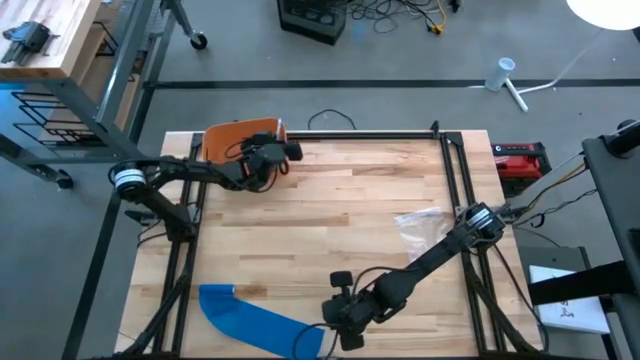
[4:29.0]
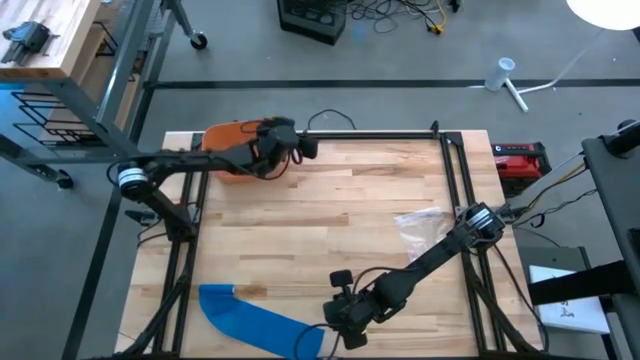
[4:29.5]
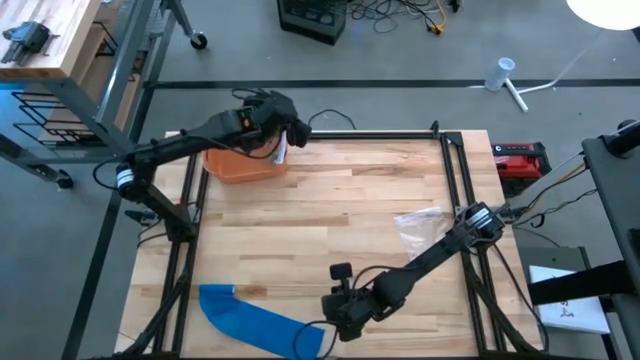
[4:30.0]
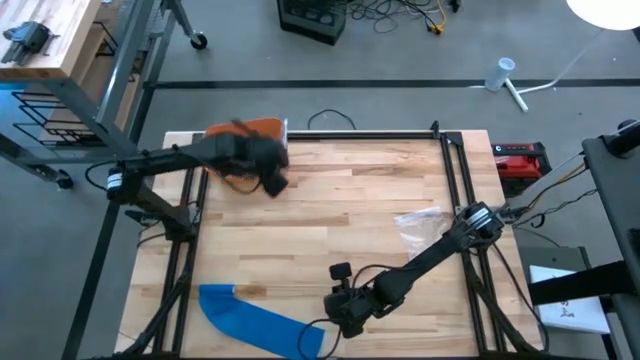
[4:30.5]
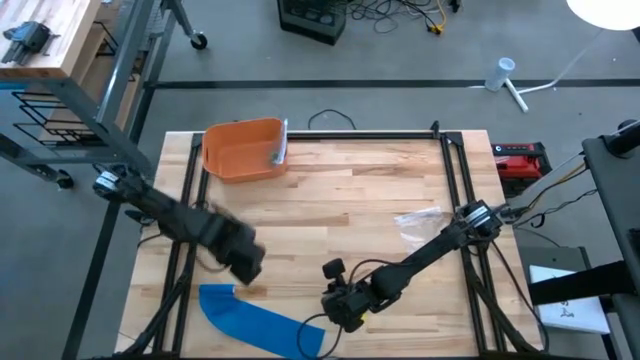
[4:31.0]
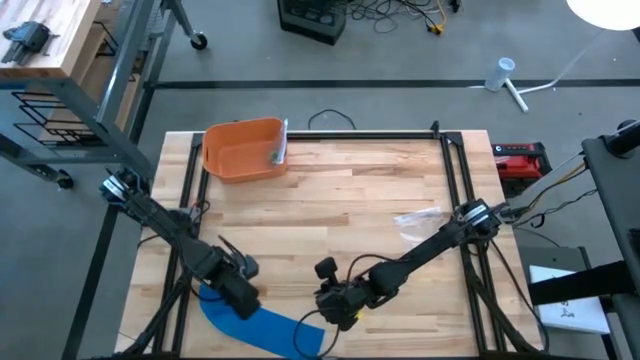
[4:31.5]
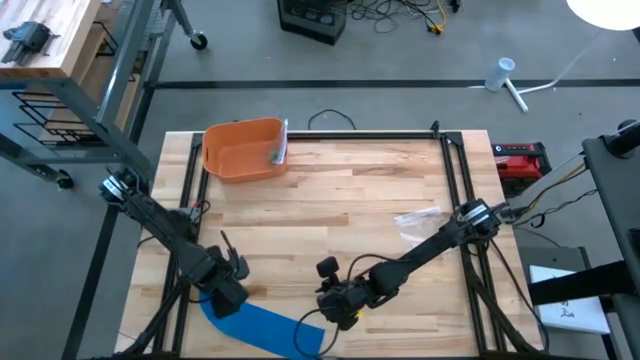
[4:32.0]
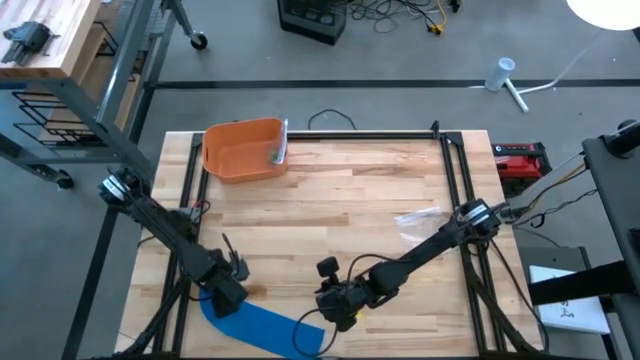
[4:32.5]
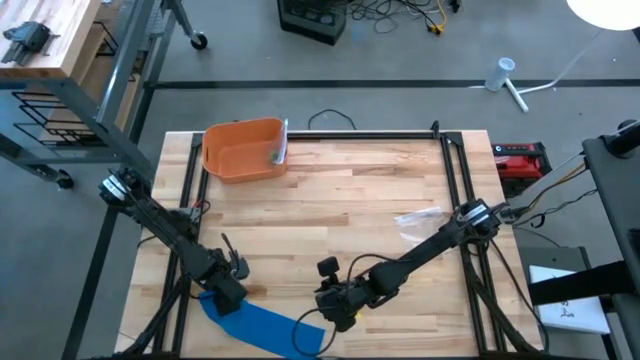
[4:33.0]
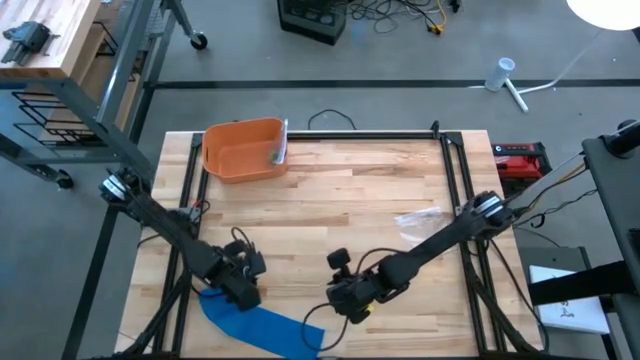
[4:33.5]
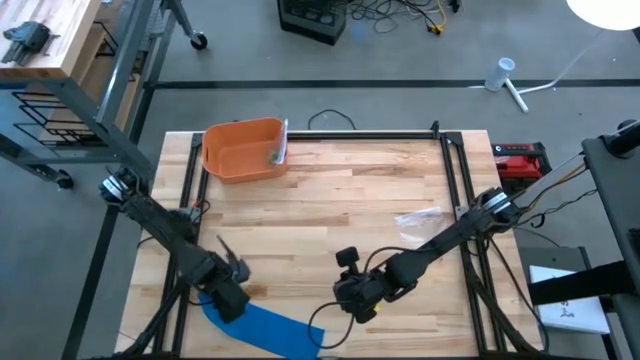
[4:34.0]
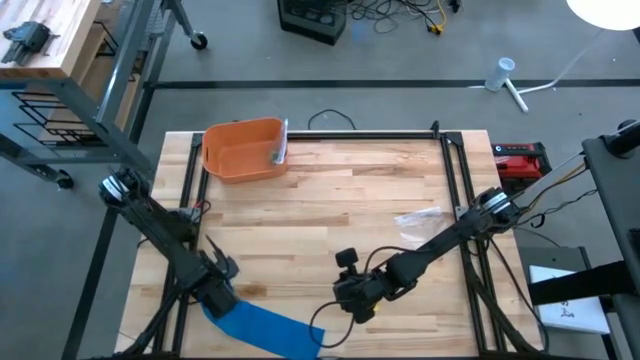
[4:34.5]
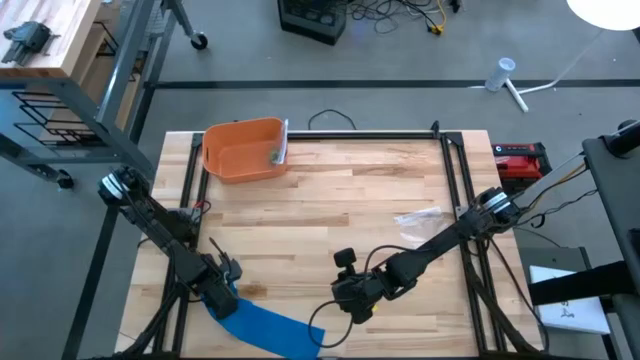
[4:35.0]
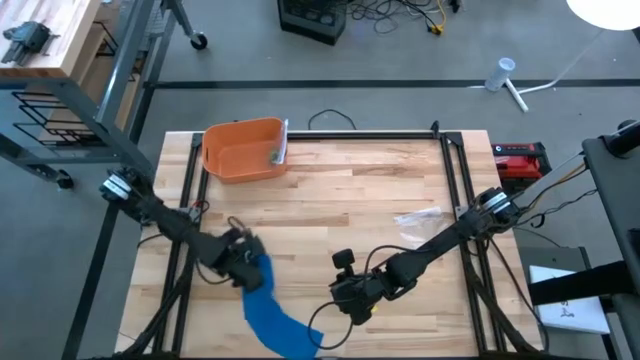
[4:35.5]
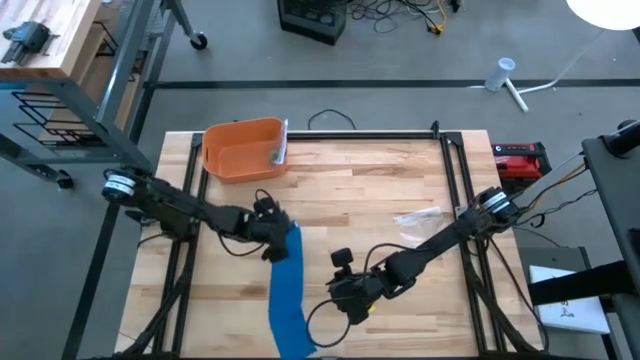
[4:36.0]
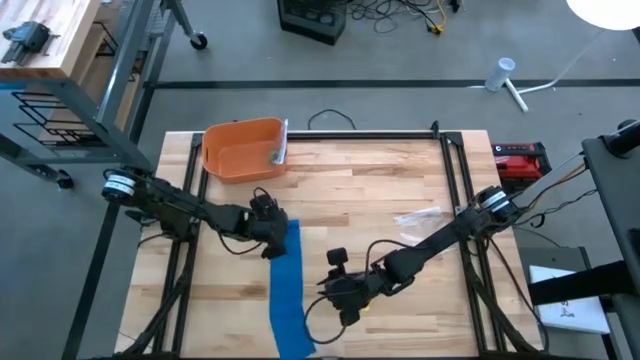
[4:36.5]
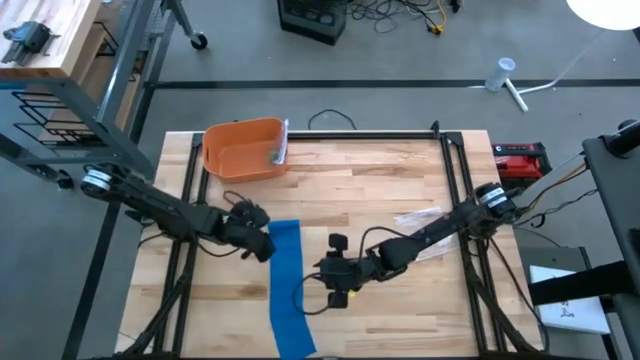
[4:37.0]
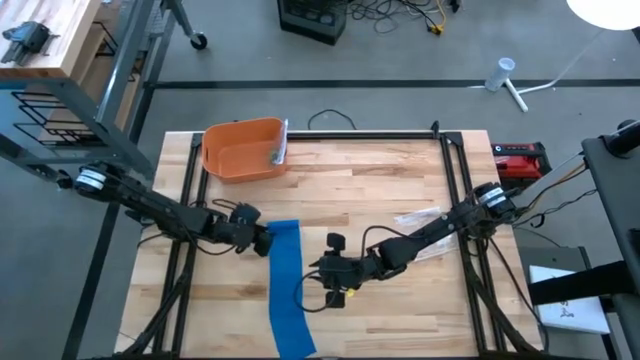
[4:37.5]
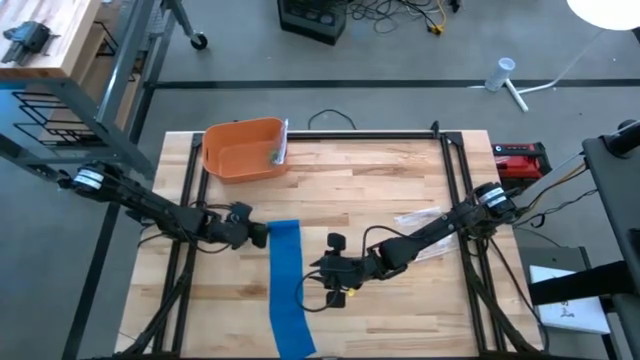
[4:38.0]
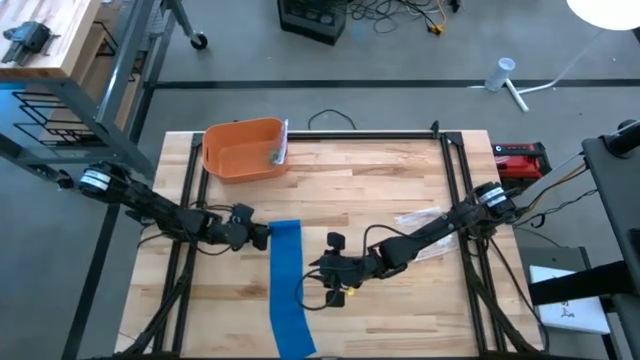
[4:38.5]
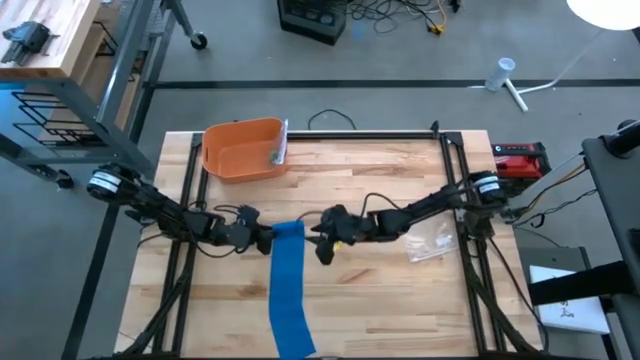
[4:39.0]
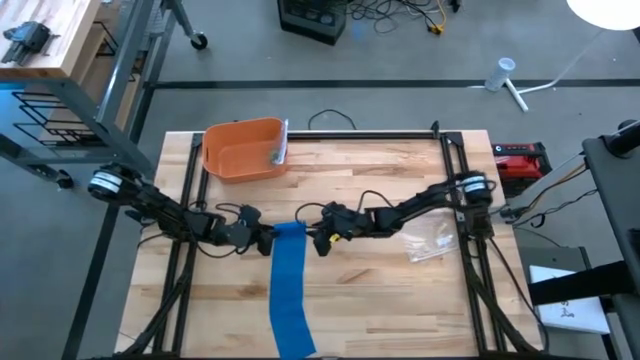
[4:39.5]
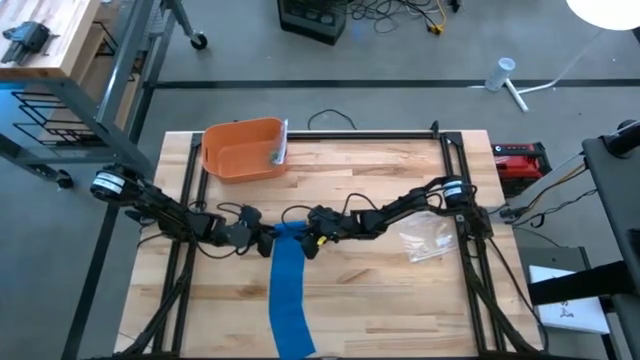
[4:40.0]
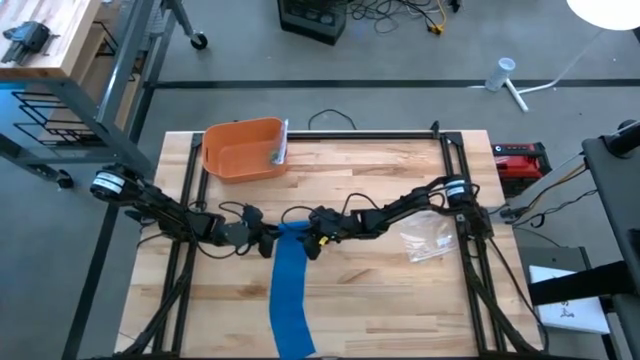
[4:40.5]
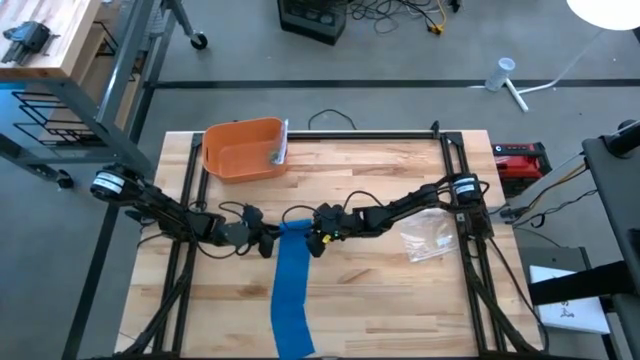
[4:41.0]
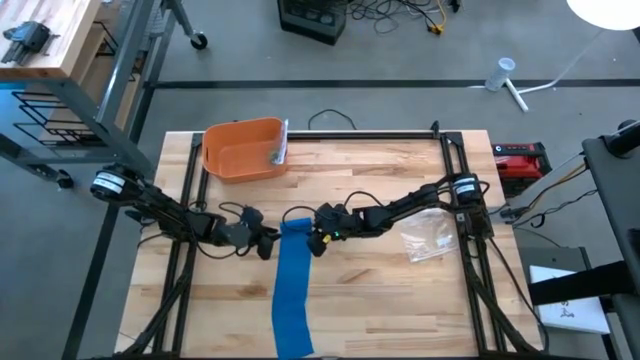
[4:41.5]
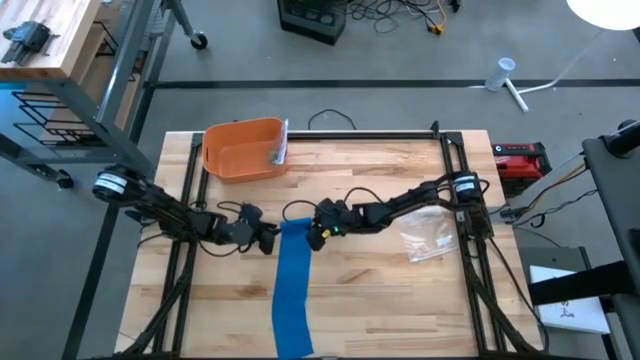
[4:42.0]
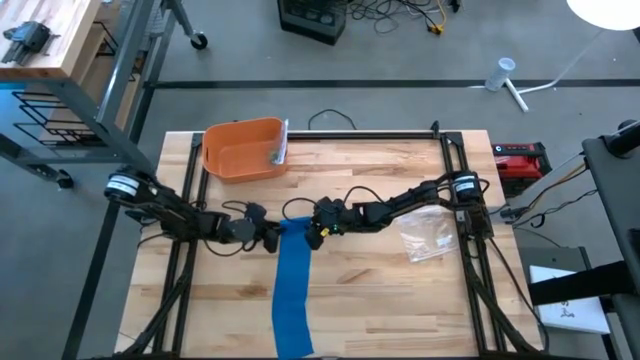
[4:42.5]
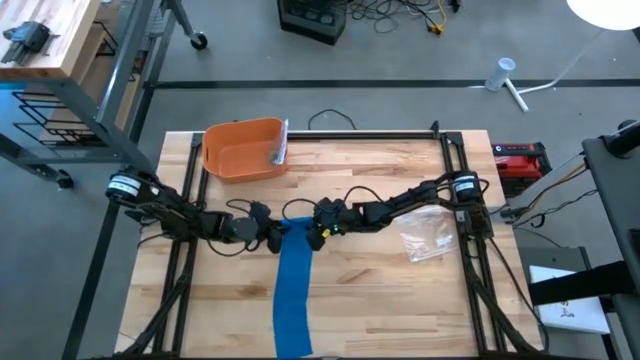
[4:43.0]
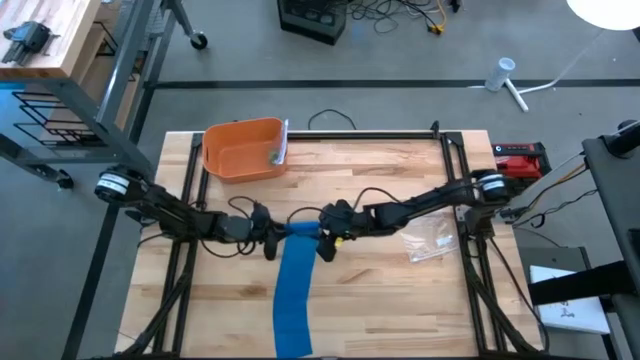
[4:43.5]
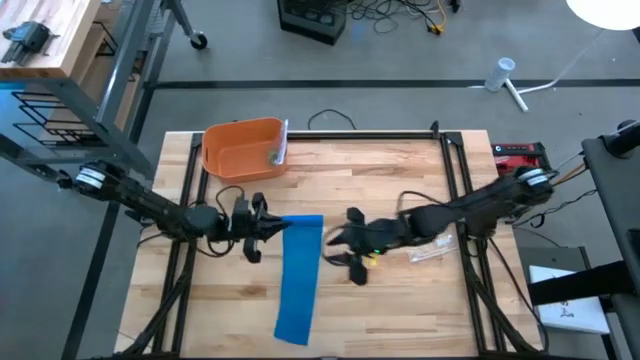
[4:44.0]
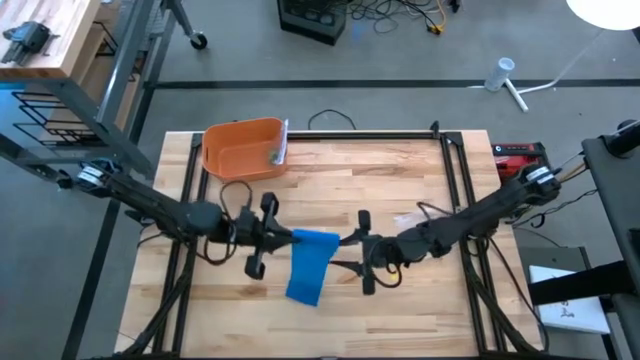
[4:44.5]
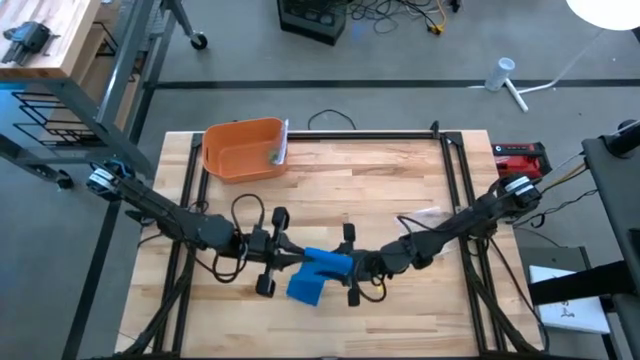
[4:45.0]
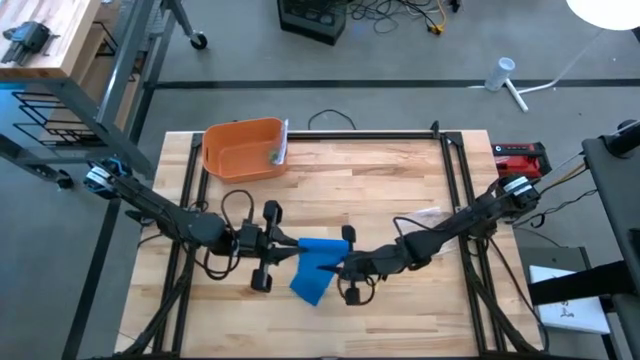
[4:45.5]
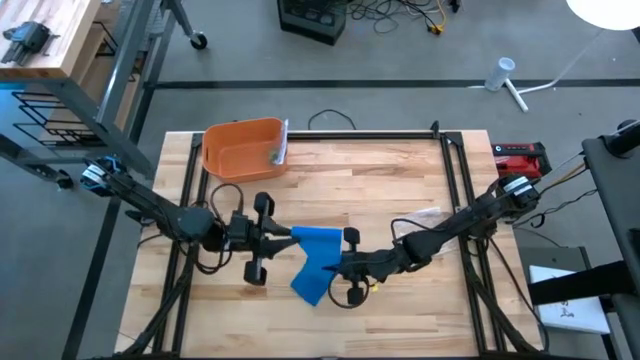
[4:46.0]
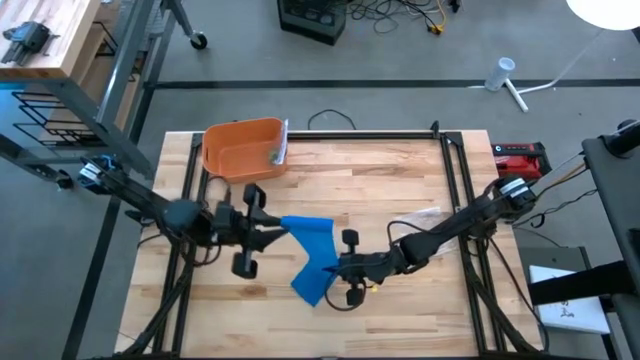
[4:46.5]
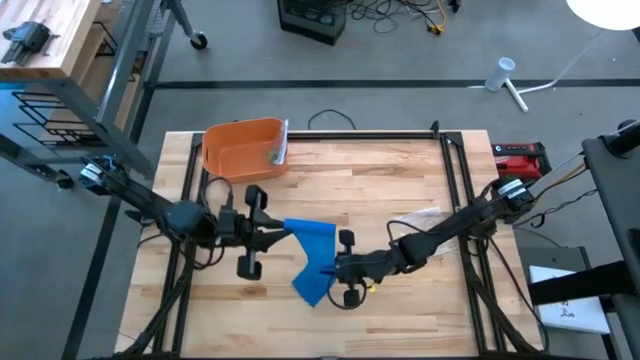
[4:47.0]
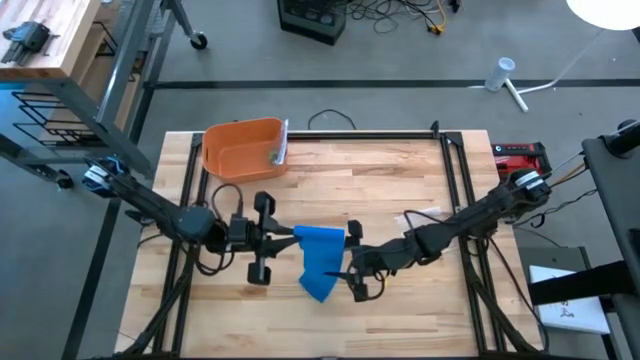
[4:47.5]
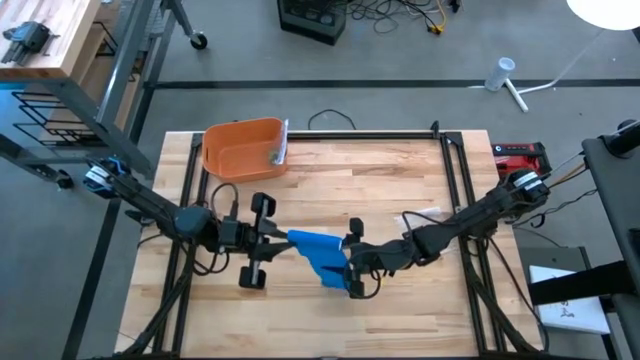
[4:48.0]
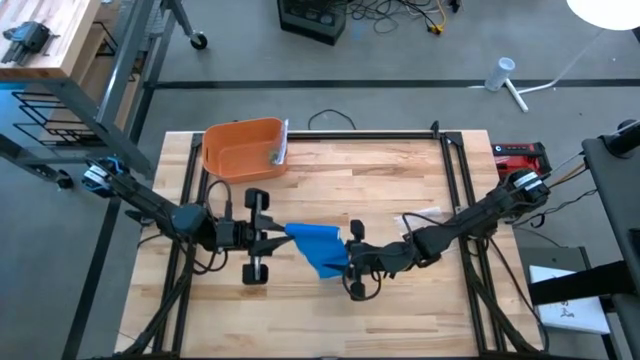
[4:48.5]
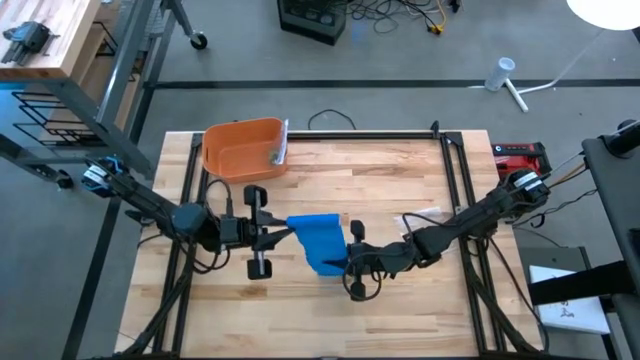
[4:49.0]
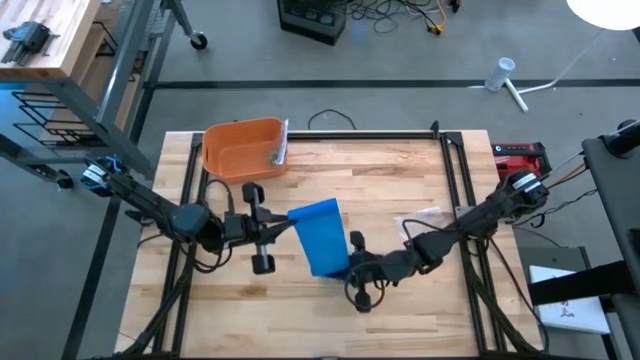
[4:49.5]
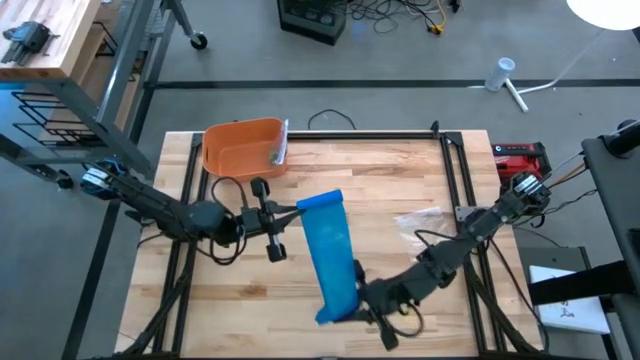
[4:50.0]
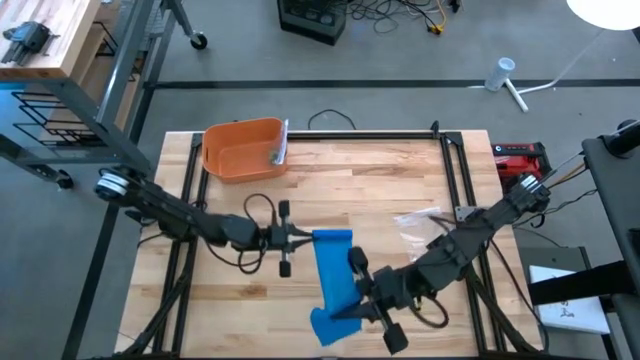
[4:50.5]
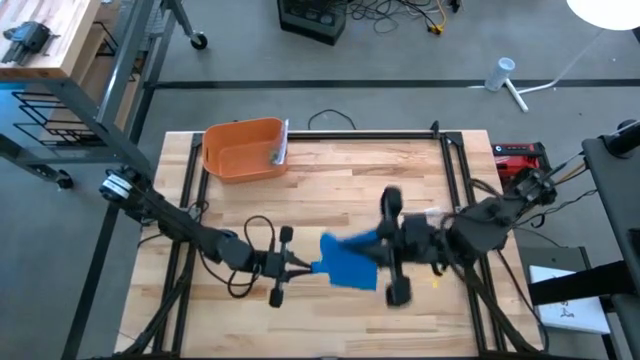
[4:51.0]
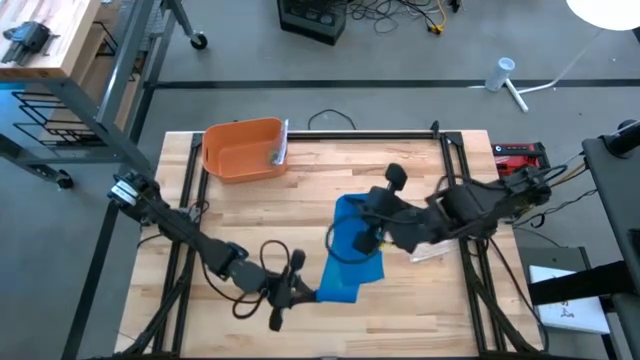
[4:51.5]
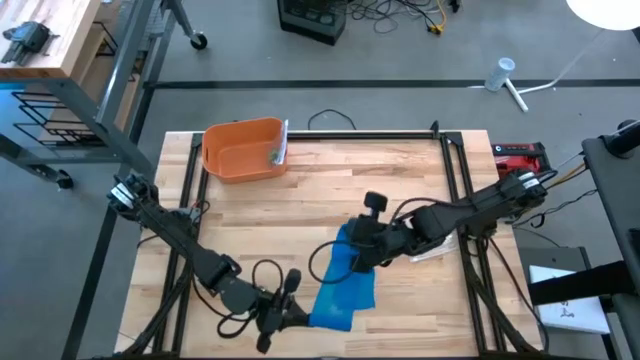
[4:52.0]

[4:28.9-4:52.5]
Task: Roll bandage
Roll the blue bandage
